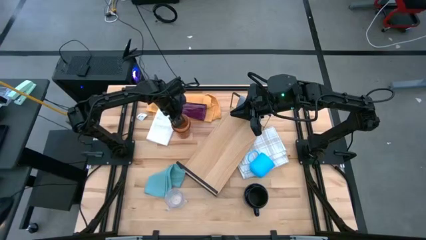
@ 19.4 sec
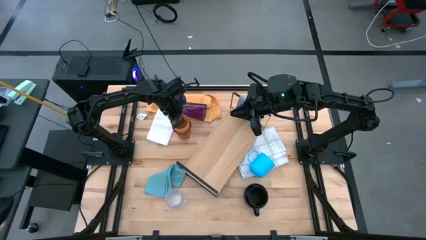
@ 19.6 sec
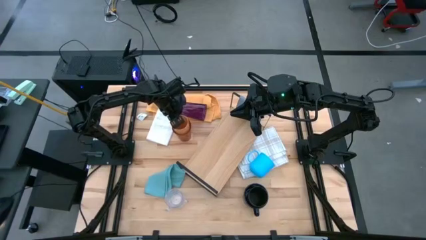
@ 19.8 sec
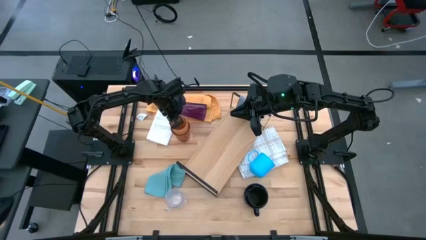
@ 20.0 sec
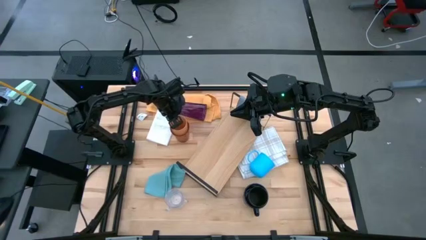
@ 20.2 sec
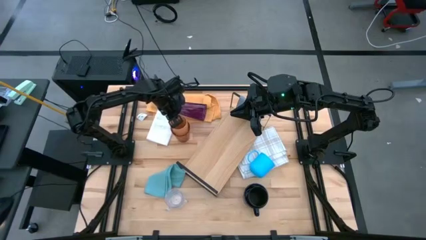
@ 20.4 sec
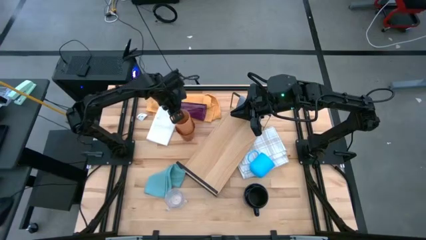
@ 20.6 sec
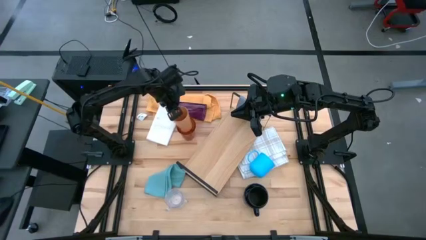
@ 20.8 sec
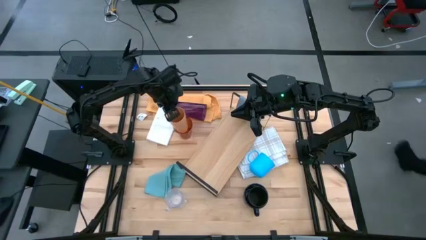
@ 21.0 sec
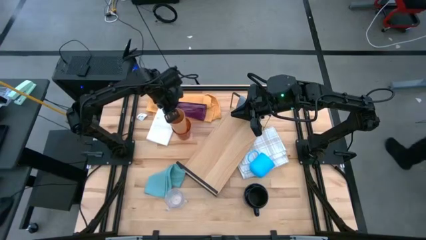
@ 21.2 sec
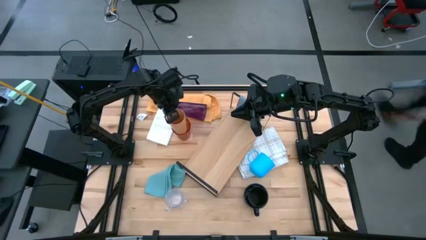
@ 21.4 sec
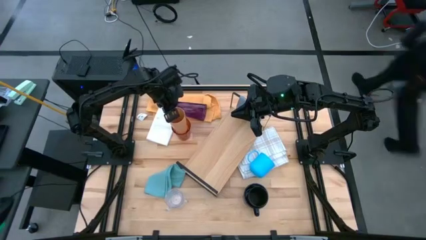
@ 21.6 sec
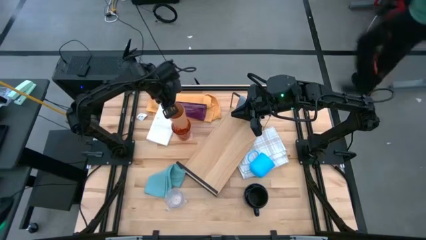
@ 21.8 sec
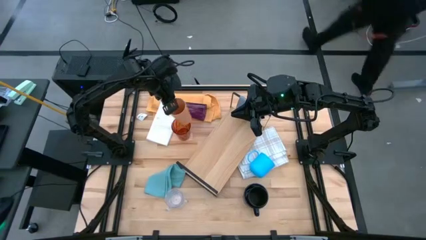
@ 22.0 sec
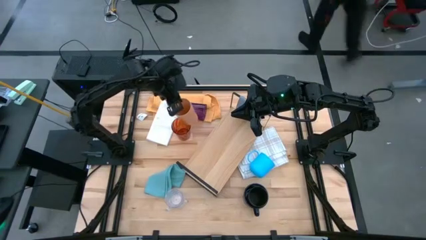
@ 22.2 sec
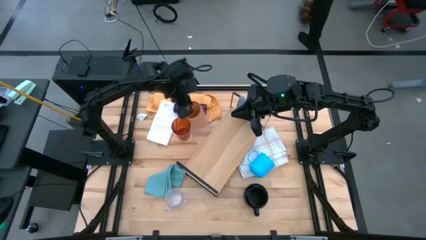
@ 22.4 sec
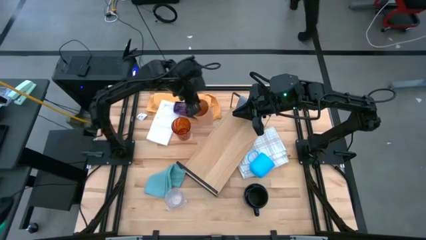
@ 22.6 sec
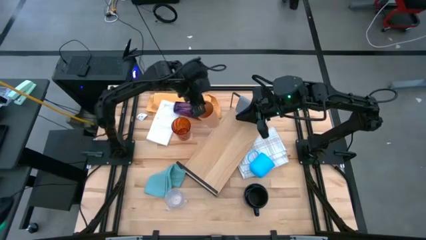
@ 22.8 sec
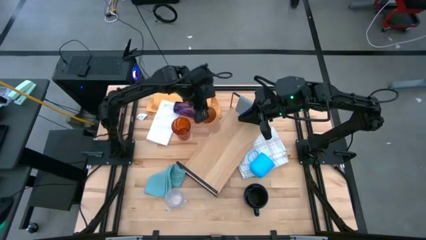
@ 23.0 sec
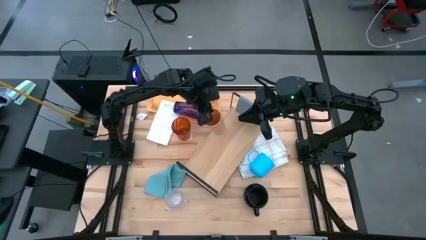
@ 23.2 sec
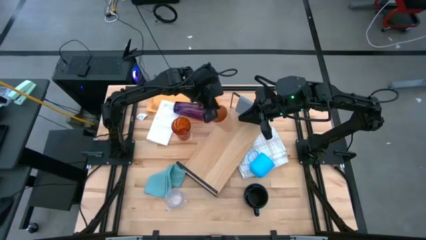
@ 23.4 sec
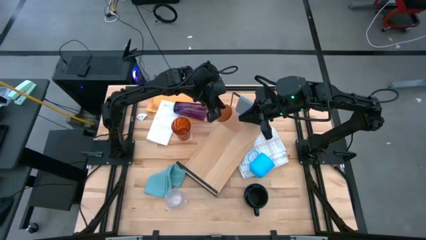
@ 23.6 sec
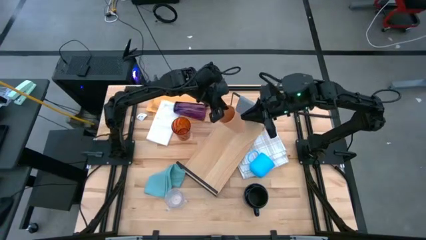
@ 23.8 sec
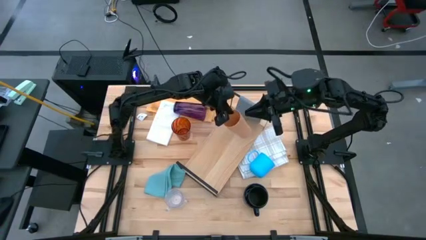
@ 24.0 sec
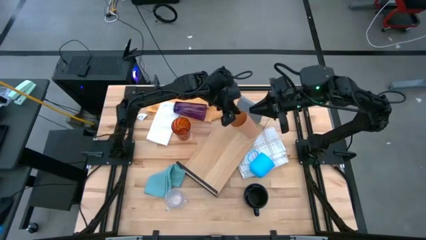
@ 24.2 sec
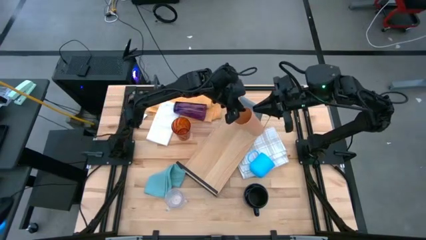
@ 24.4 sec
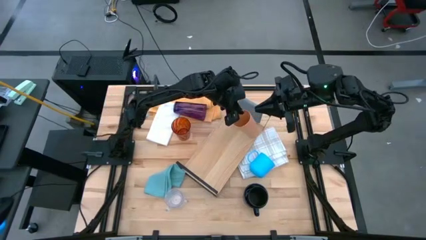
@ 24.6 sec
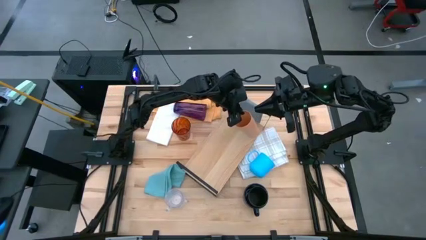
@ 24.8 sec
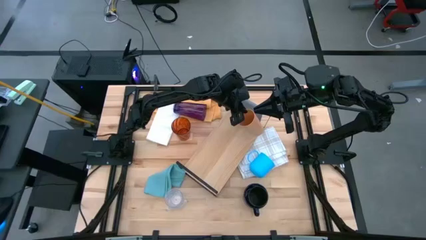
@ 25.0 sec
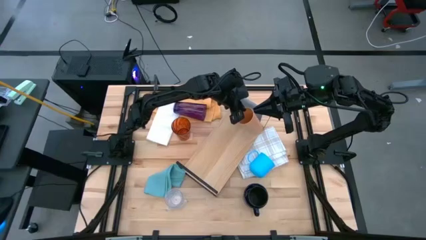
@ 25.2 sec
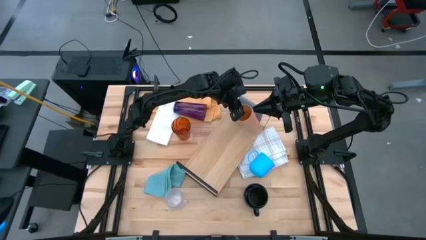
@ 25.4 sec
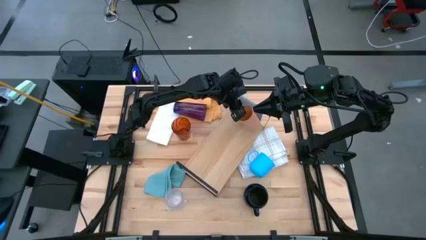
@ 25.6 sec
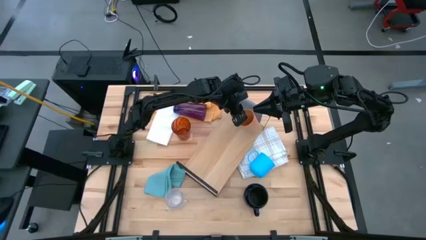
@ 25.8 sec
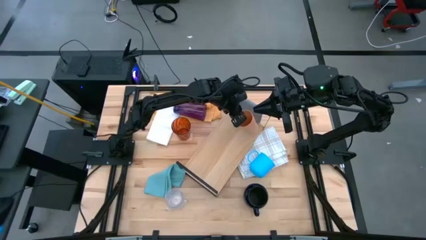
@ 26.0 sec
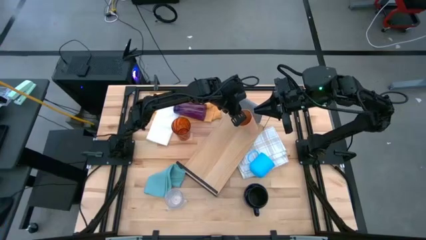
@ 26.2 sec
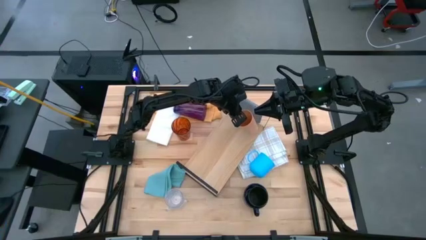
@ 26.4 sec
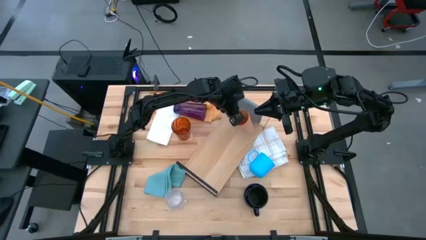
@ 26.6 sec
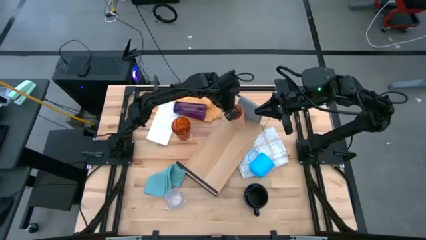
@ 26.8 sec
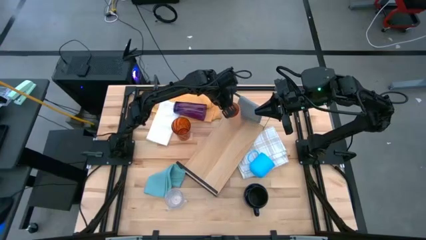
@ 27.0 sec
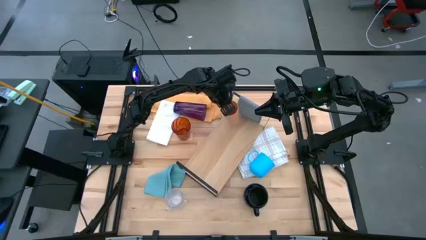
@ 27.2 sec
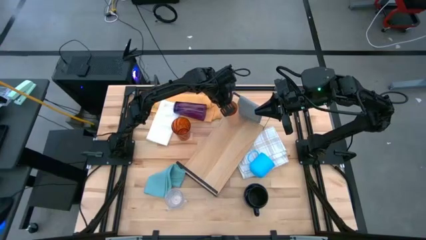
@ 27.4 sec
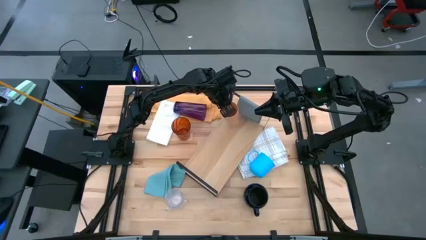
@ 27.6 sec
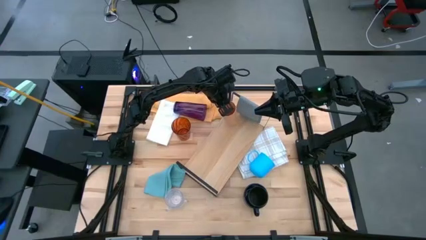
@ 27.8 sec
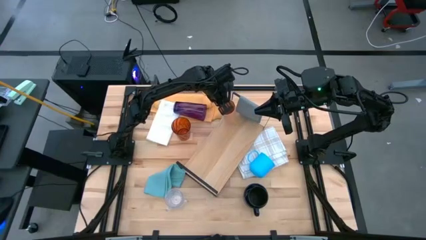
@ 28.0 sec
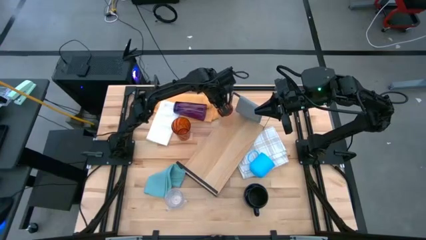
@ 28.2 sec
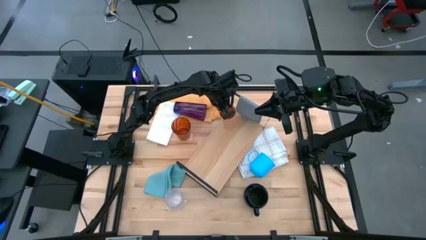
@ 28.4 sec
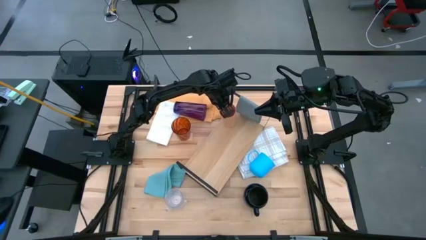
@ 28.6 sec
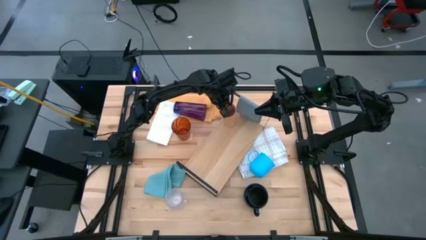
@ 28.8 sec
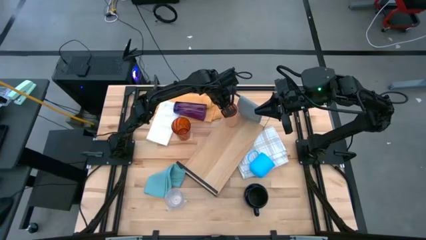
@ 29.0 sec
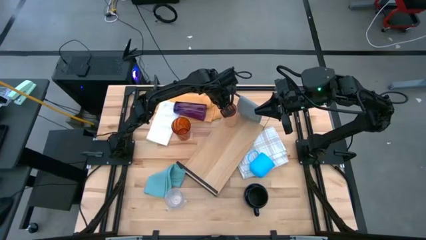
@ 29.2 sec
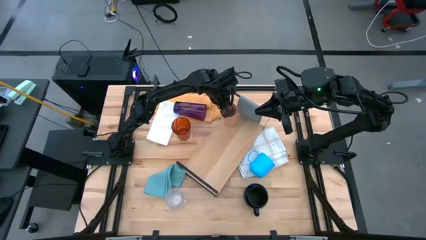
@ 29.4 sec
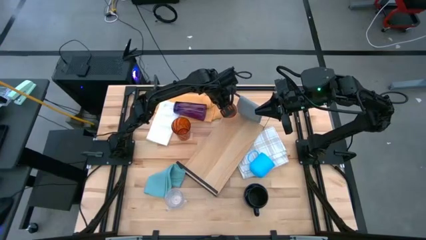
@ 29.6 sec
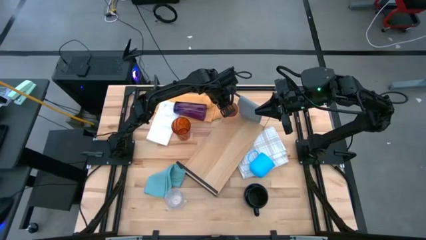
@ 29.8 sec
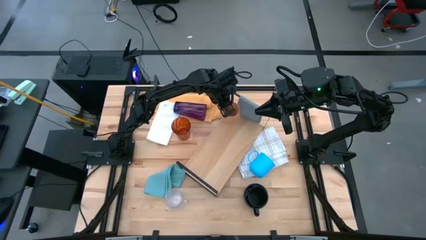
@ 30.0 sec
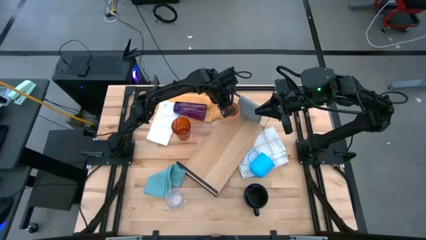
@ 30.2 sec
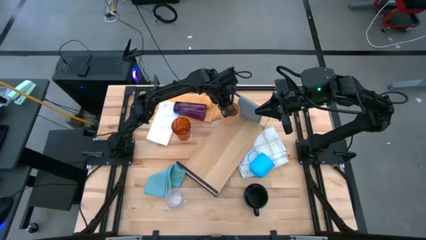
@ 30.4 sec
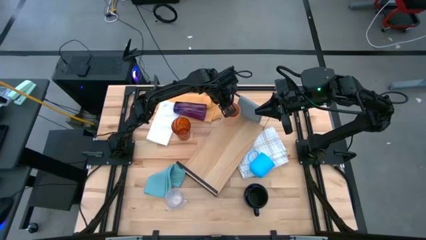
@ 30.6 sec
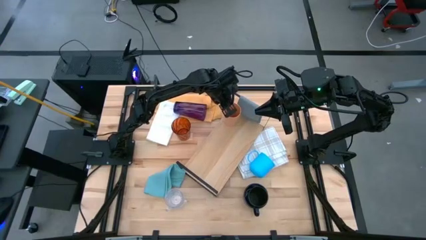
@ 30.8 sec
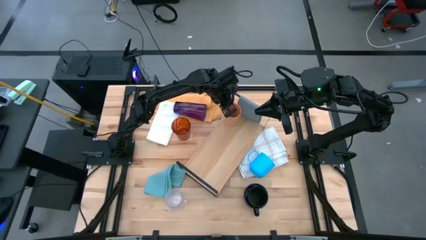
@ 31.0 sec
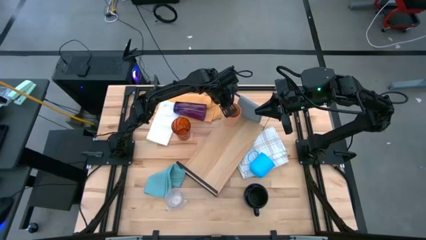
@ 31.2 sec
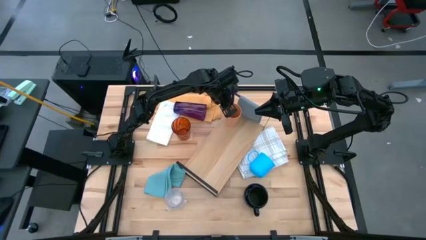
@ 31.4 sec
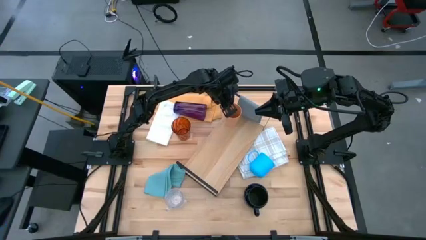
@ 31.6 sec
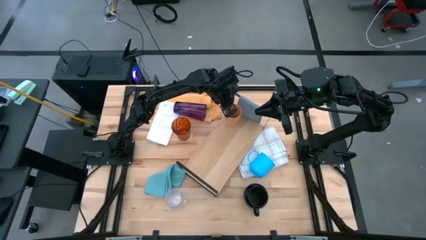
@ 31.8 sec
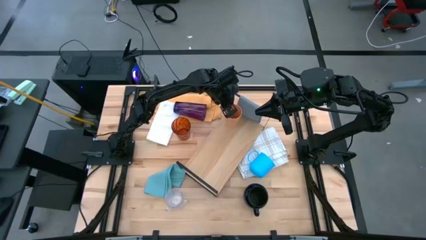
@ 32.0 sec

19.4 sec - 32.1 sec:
Task: Stack small to large cups/mugs on shelf
Put the orange cup on the shelf
